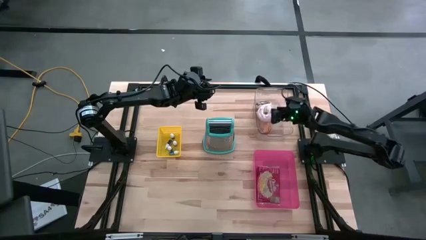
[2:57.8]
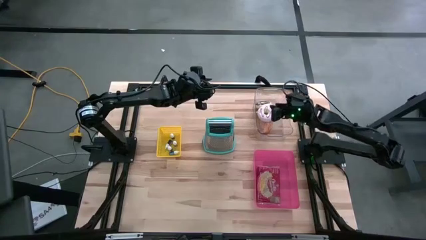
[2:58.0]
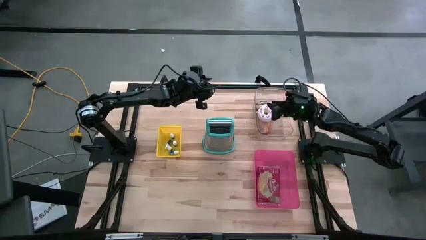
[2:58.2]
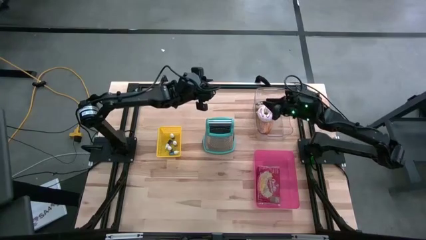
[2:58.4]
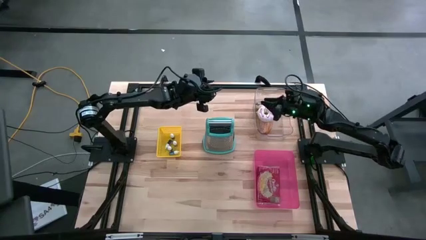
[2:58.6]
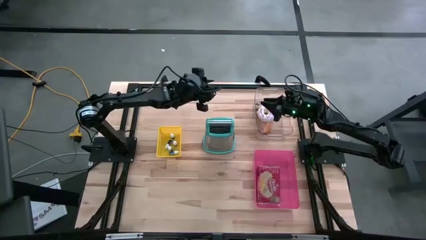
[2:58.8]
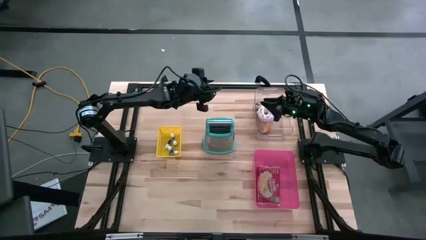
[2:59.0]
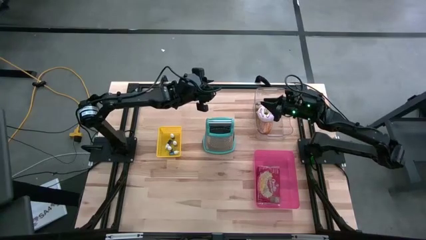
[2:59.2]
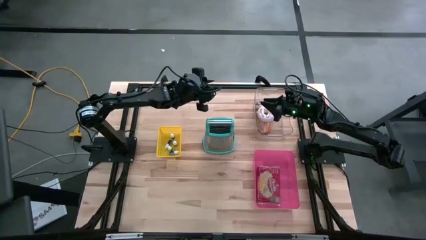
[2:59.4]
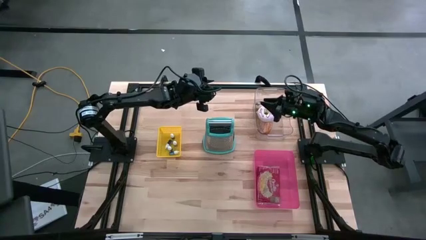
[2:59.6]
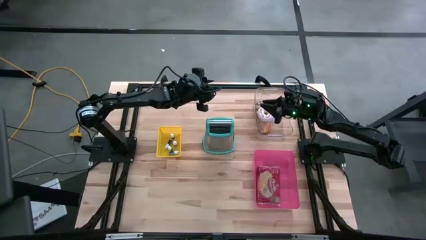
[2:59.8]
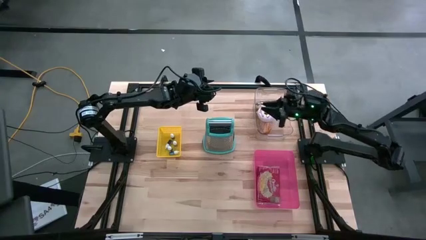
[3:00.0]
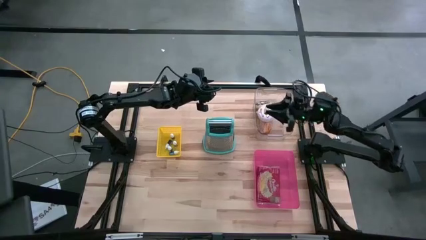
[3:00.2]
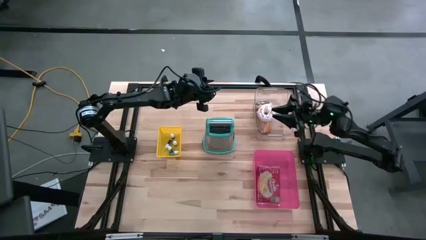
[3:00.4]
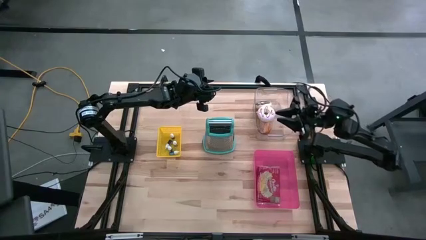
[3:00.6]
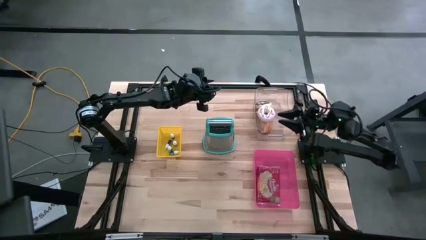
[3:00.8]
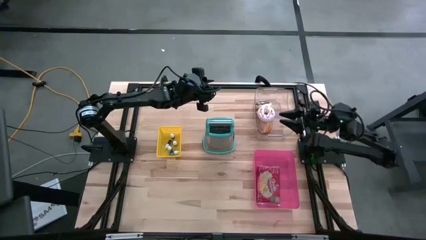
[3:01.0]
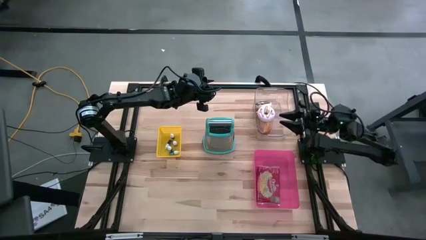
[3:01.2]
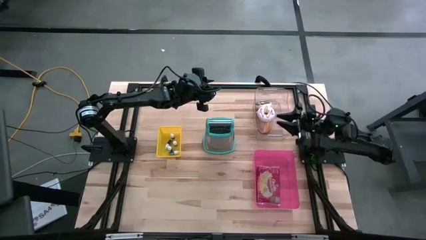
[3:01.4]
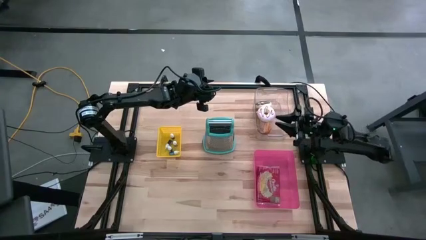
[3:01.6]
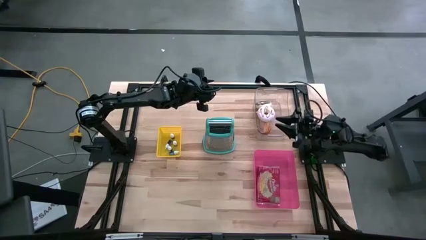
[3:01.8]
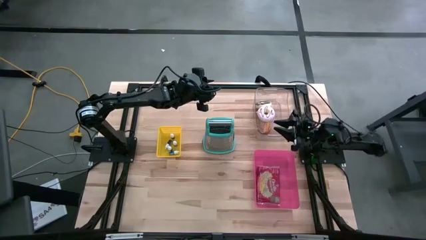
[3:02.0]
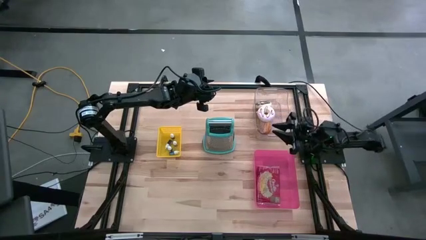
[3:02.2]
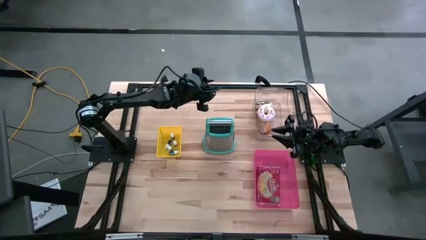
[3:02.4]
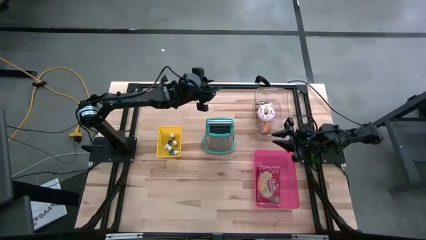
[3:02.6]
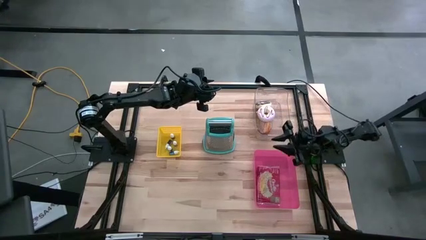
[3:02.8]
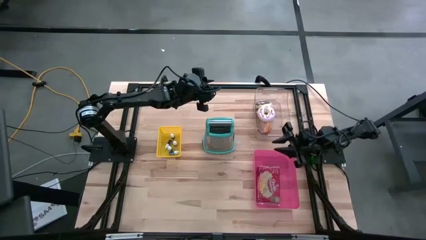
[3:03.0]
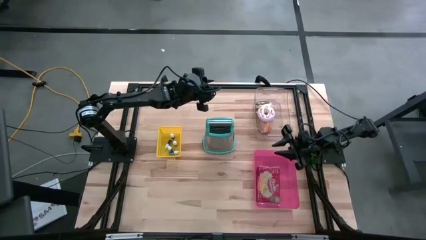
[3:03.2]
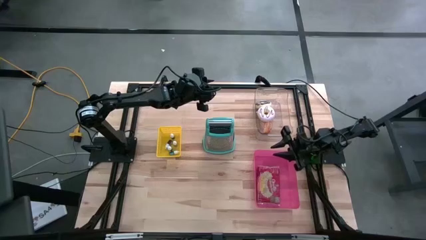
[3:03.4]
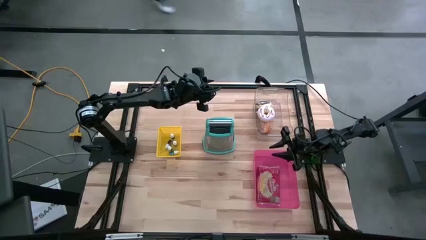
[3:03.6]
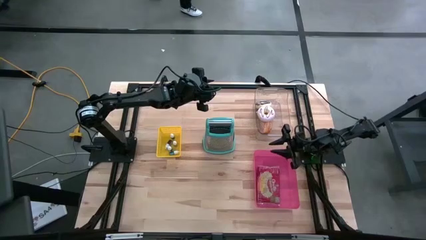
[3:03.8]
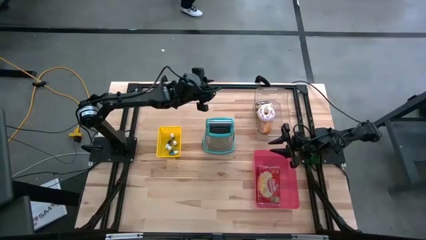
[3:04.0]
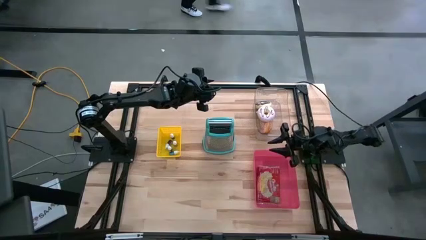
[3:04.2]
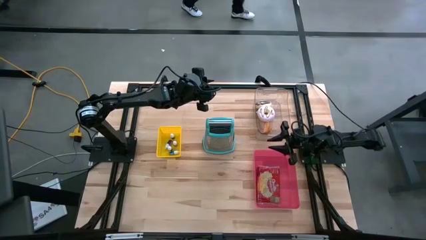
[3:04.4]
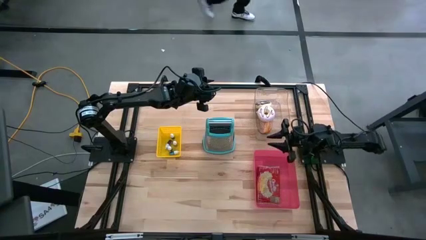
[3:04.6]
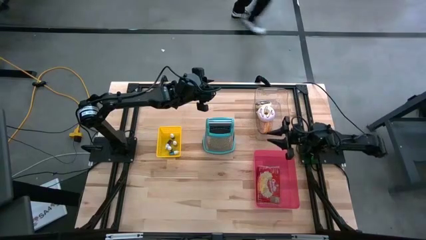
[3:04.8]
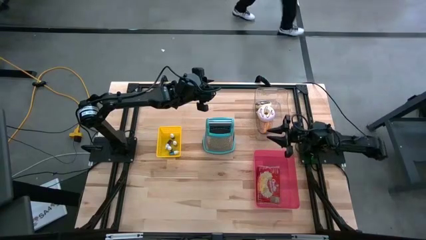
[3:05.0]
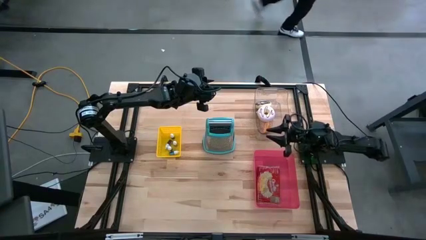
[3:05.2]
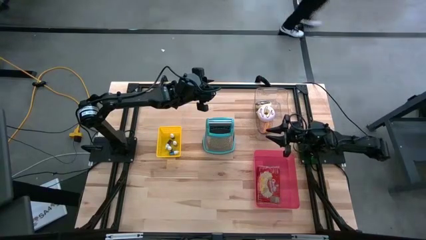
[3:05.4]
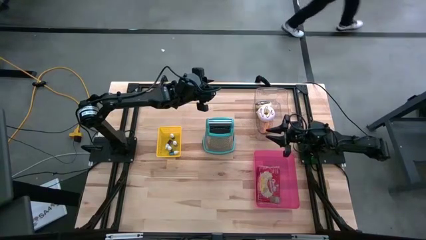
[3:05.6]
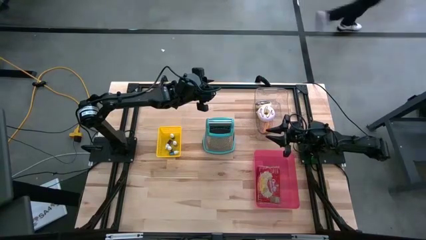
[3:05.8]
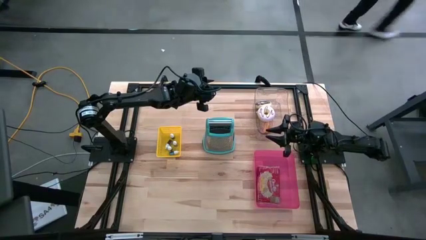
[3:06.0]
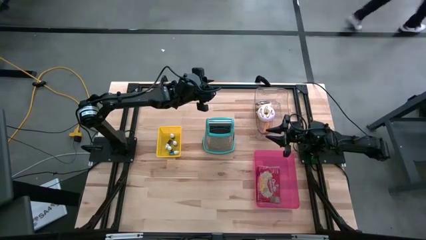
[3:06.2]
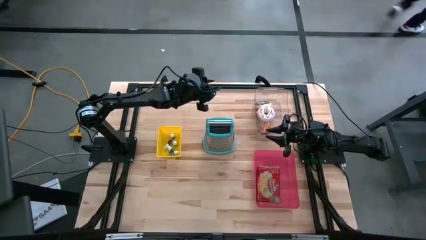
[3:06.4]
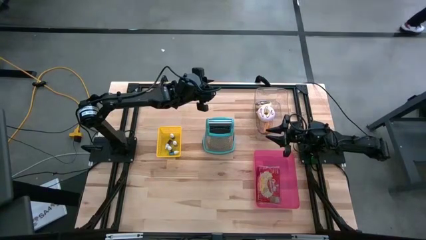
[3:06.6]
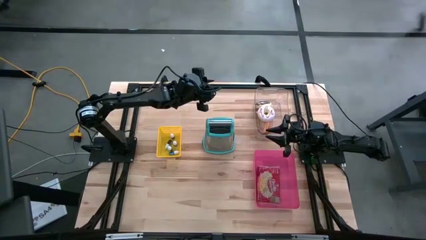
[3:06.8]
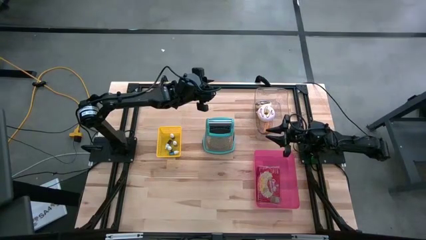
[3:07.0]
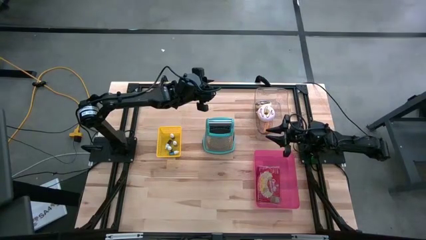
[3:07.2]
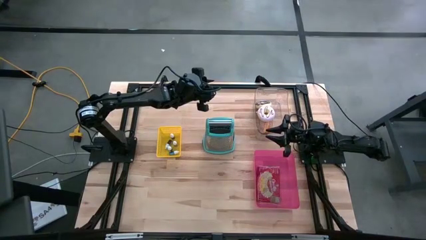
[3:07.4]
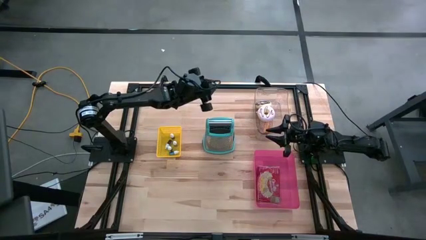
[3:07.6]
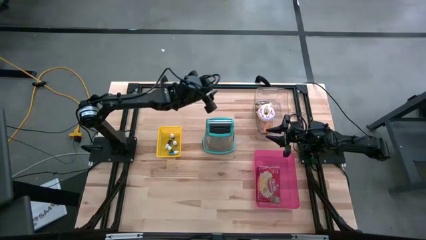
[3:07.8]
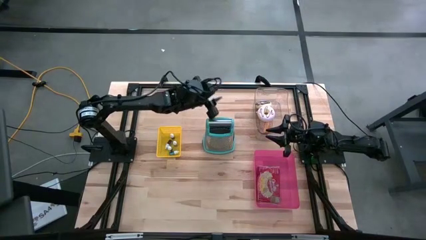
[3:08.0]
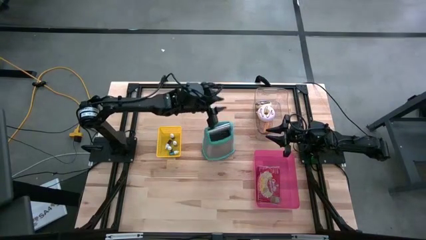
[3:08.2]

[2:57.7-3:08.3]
Return to Home Position

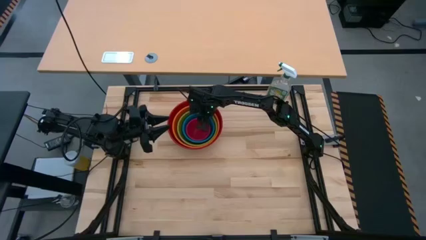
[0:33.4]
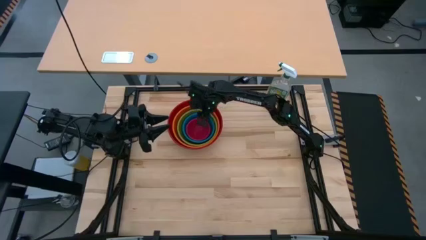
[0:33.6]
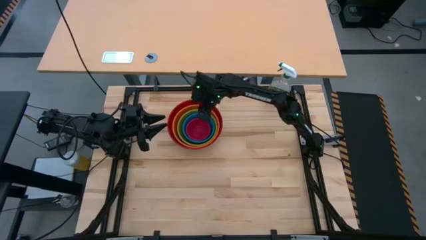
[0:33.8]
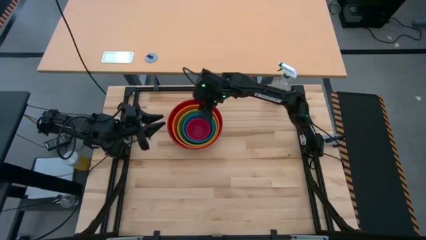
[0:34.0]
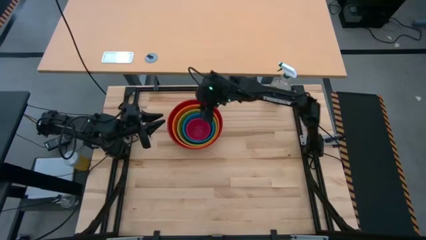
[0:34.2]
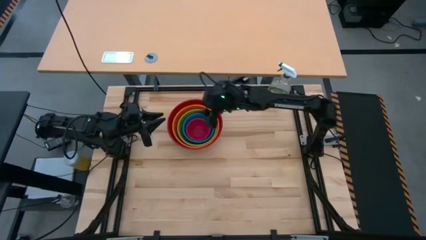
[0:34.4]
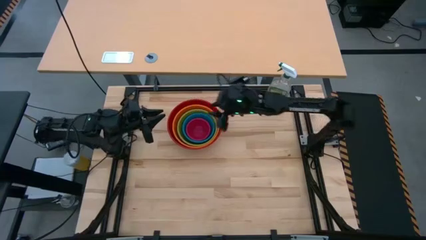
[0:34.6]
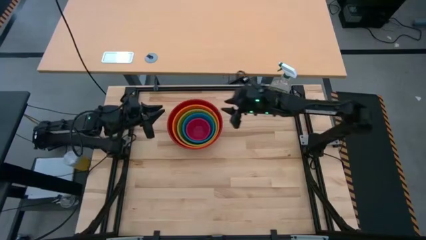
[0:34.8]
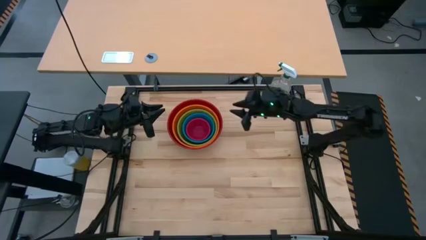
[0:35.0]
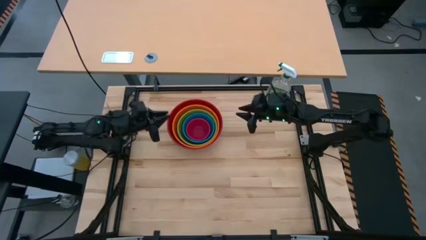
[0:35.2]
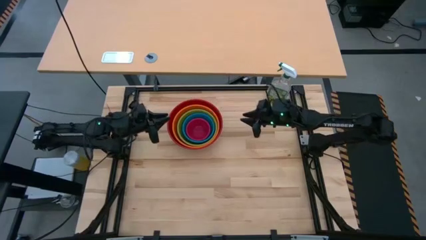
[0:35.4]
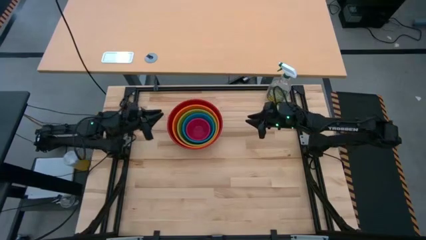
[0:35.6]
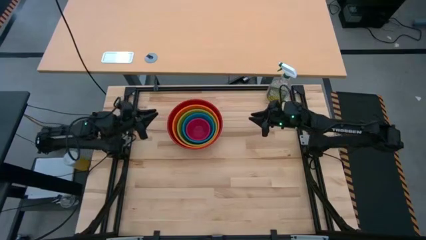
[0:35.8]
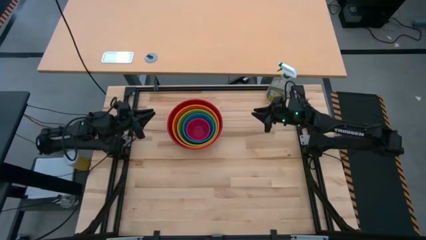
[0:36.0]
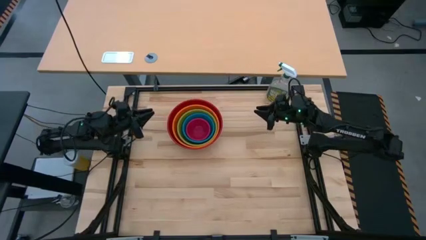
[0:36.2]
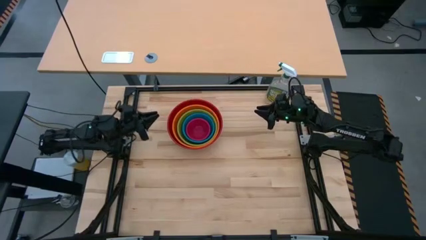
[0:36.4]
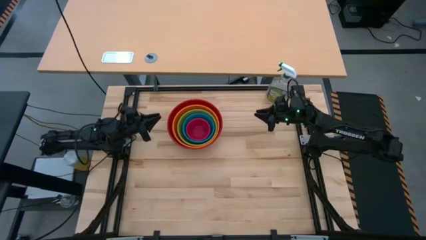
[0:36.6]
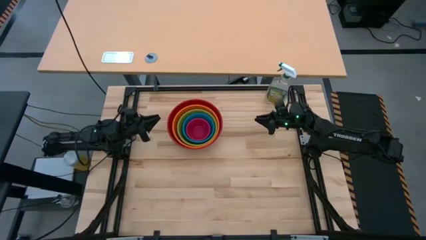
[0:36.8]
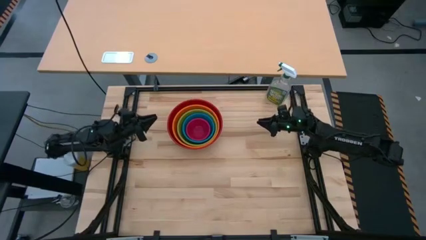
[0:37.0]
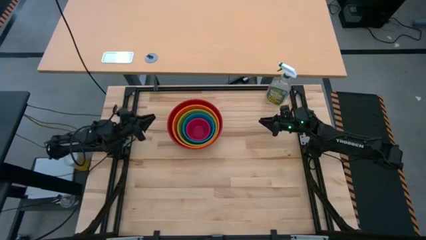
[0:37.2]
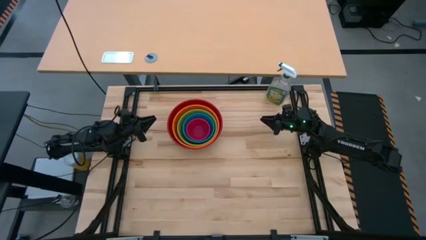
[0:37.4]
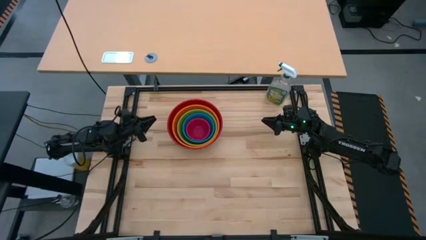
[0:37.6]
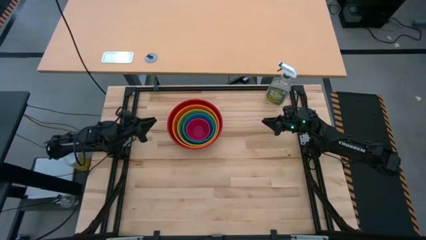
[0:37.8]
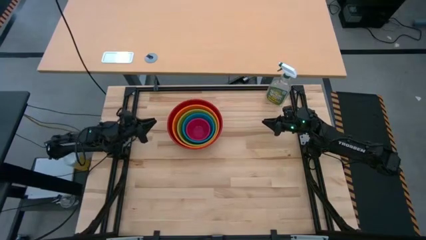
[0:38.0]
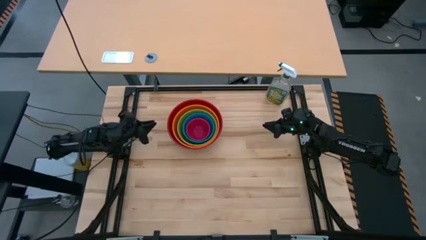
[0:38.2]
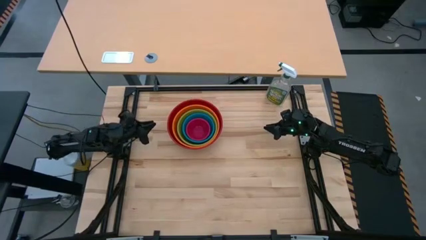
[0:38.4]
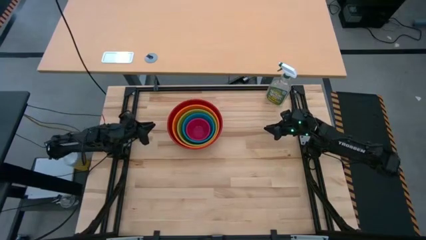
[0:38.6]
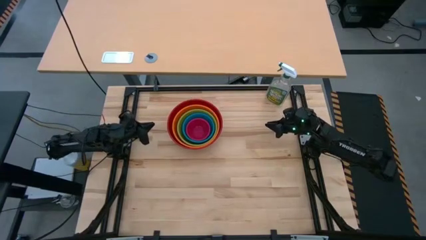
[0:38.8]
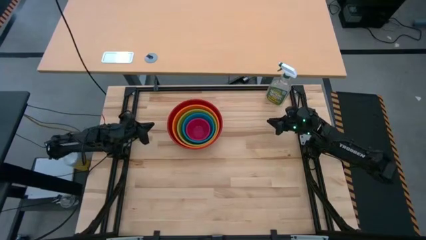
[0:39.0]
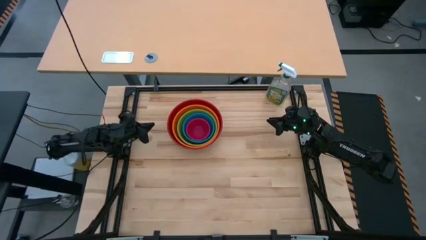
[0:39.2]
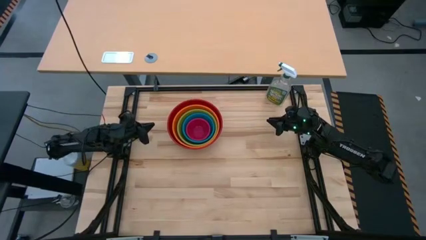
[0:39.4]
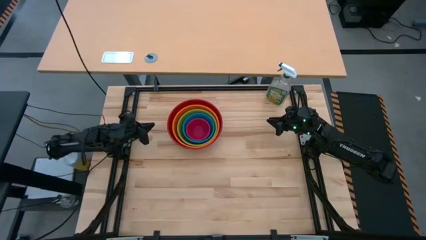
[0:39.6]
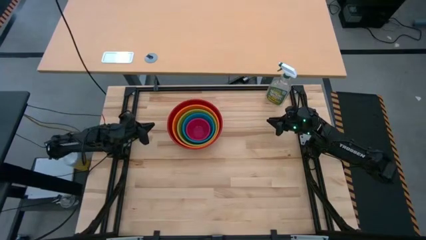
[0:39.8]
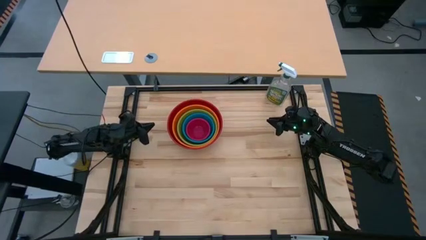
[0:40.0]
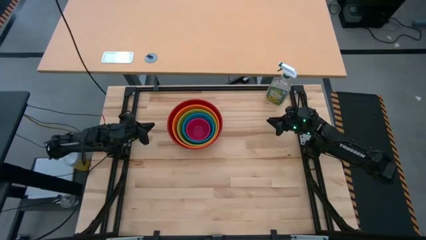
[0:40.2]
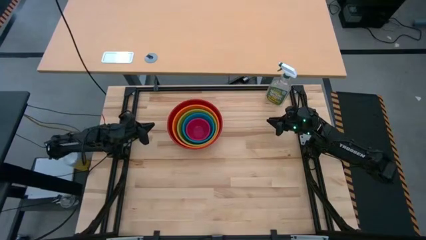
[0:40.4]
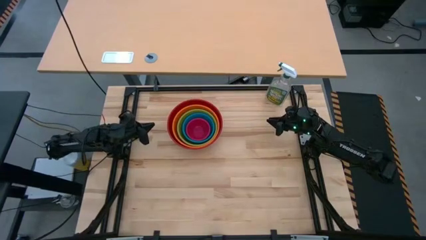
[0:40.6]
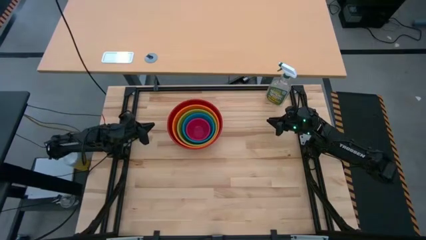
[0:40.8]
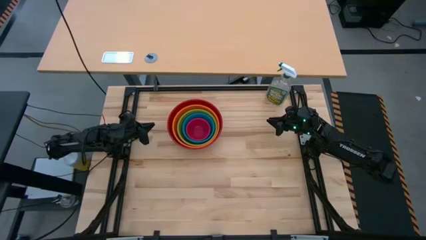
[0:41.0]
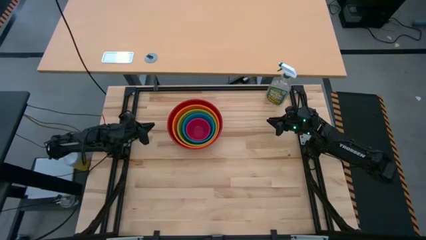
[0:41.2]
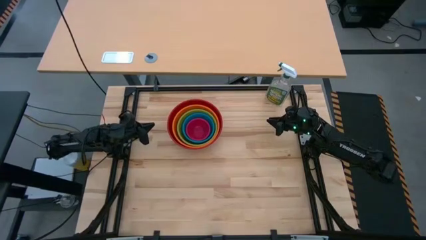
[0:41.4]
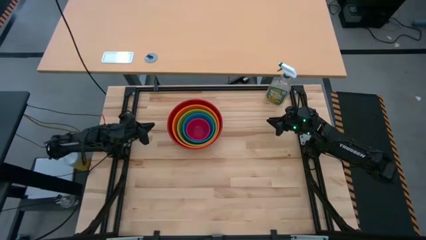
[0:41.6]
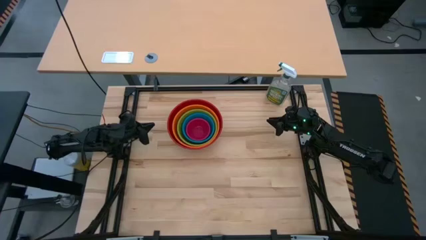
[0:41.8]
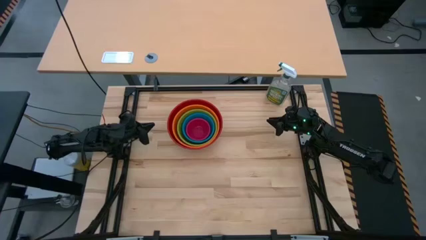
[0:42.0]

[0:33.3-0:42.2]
Return to Home Position
